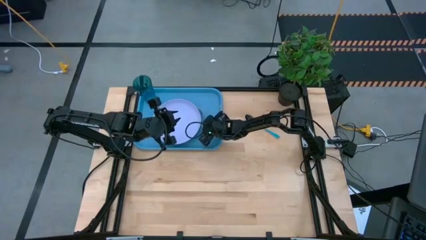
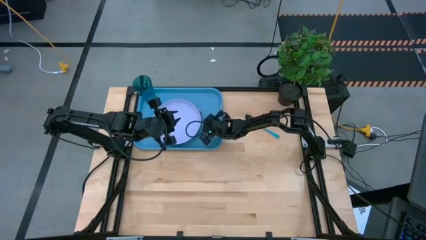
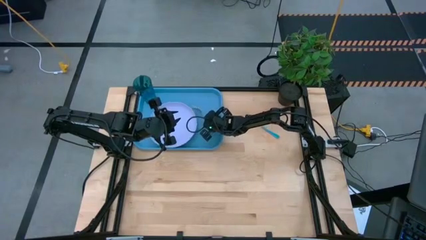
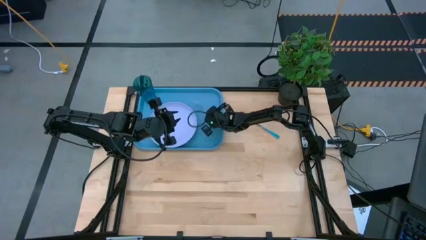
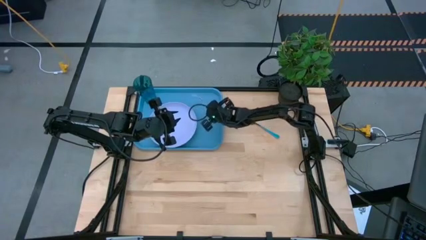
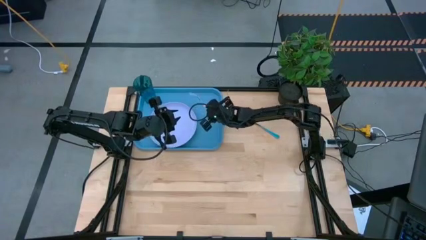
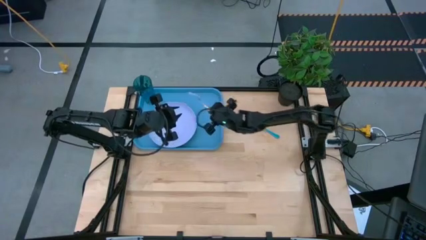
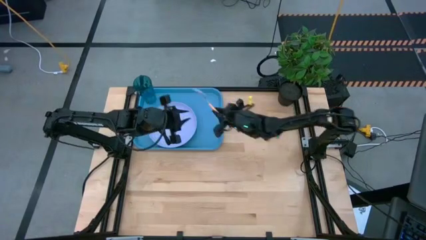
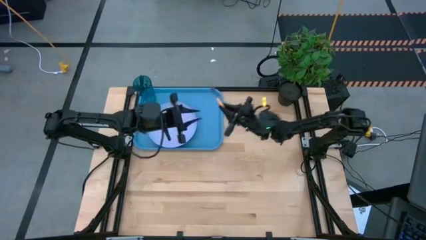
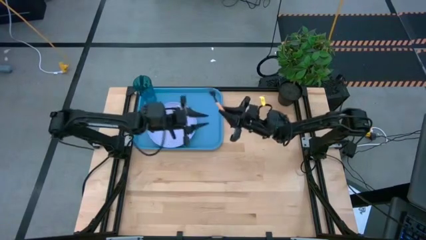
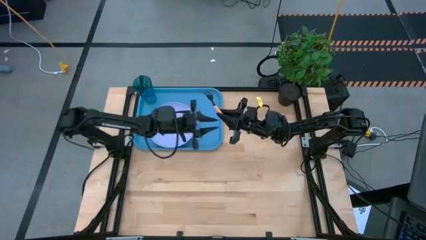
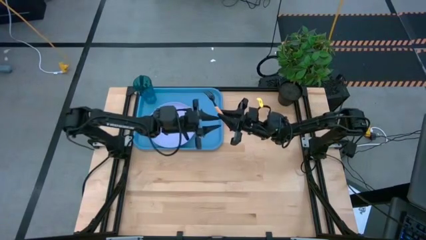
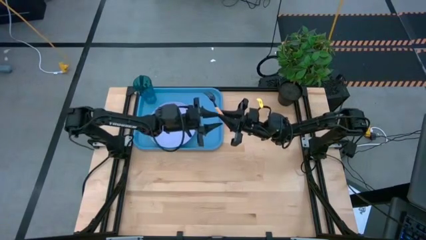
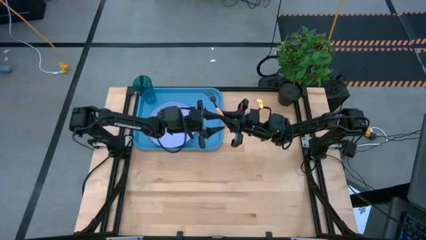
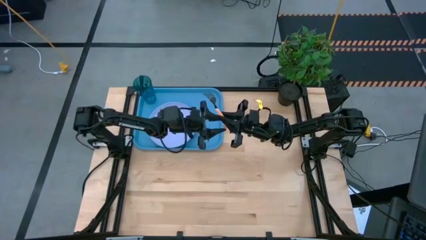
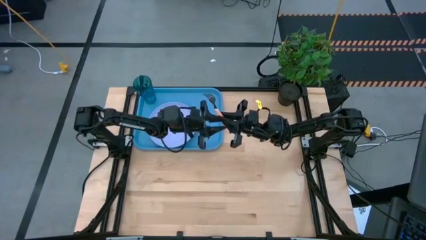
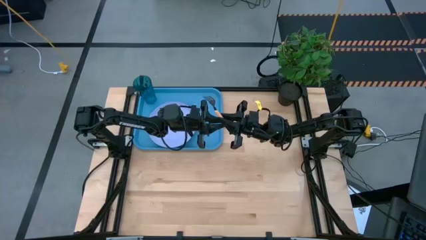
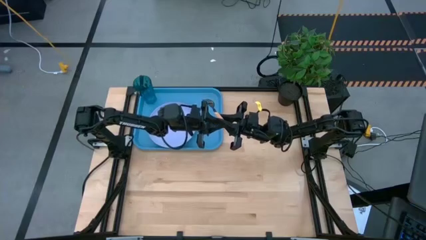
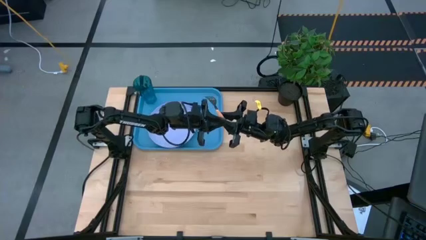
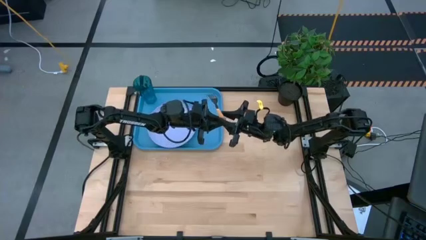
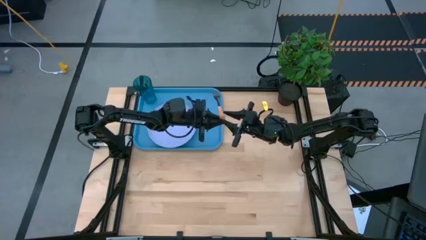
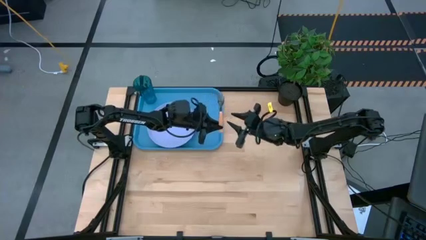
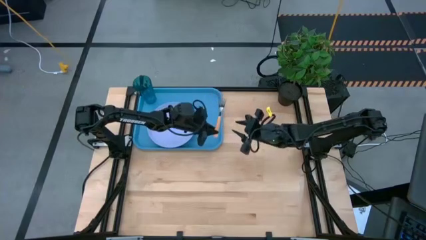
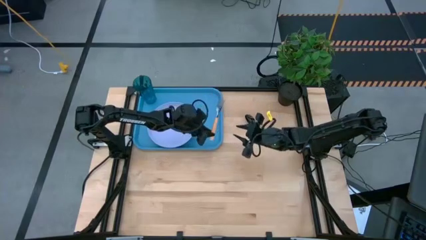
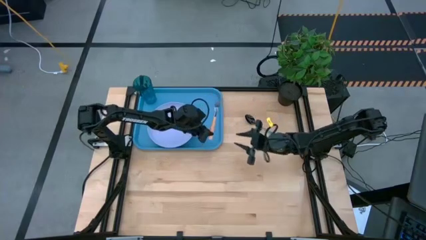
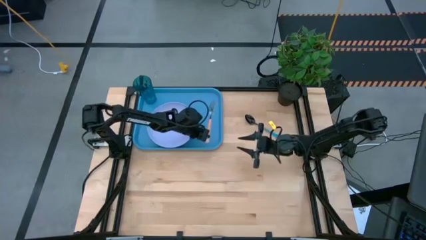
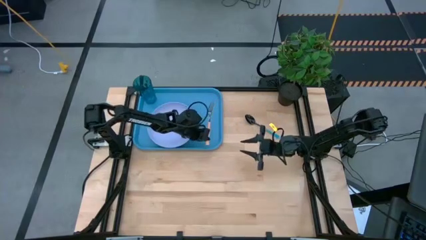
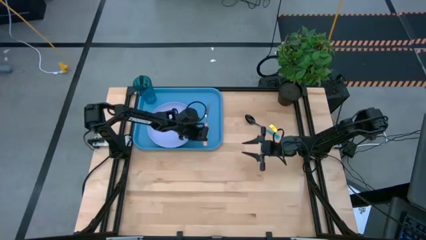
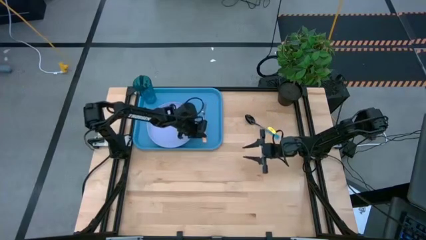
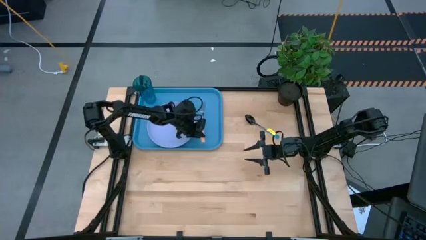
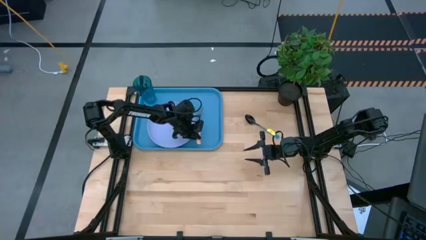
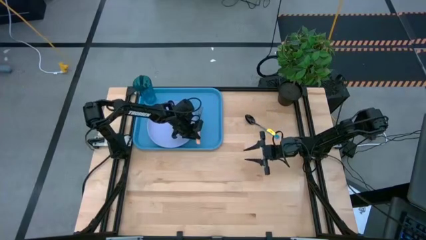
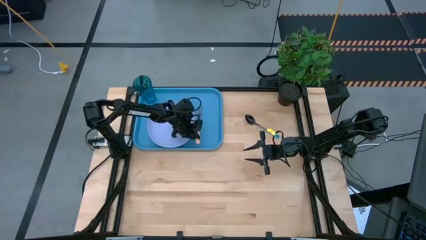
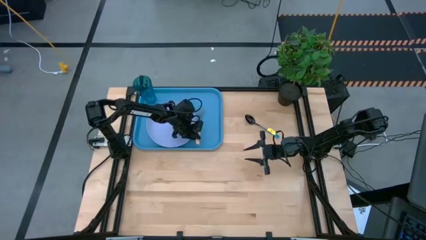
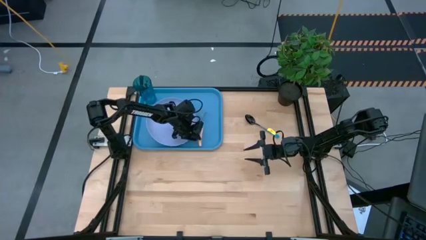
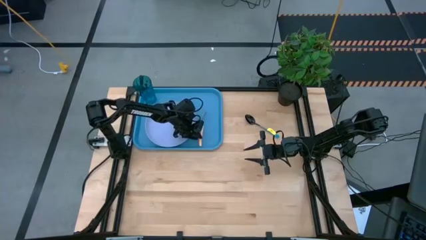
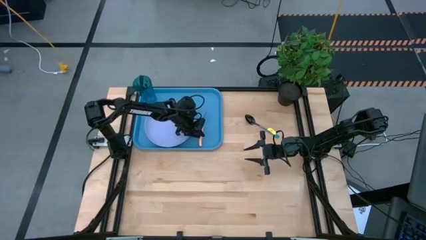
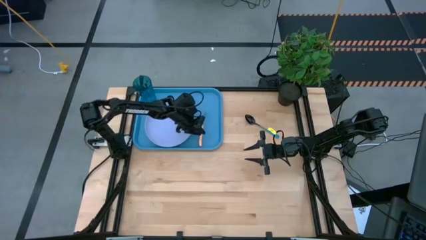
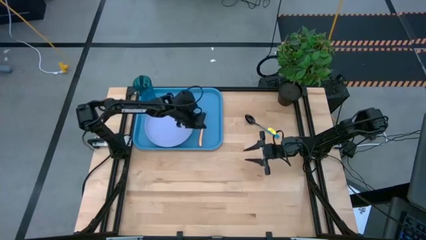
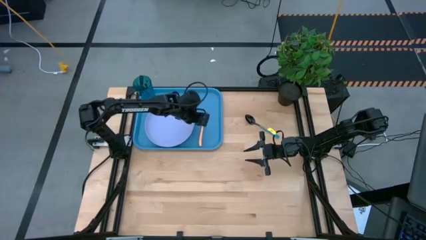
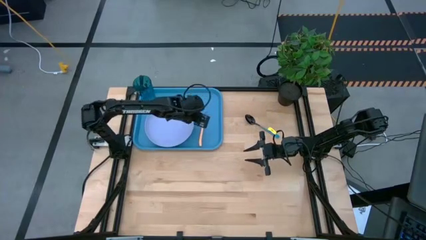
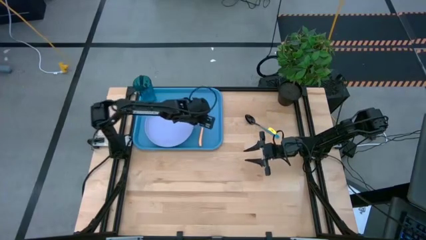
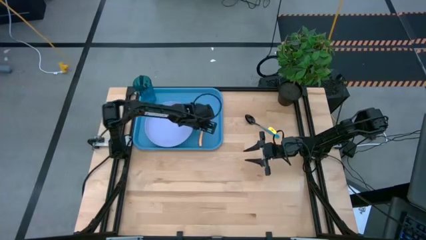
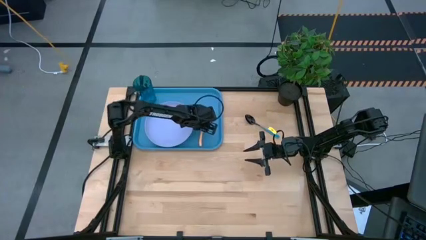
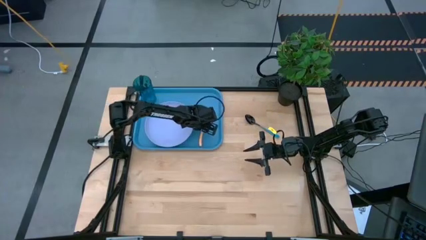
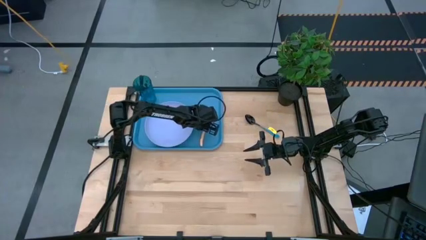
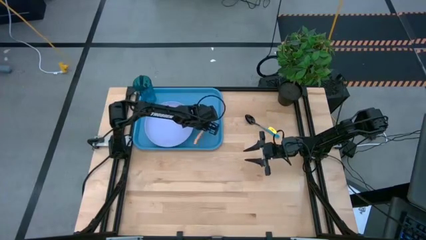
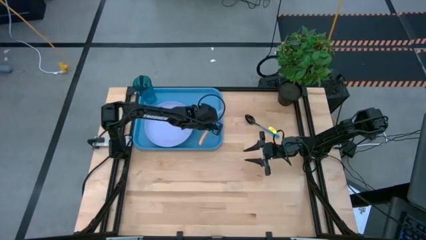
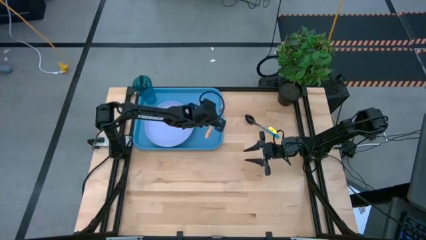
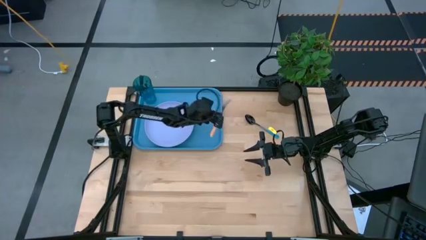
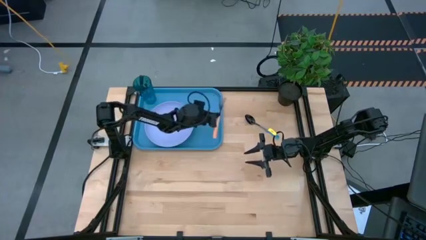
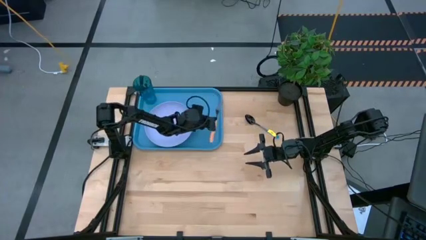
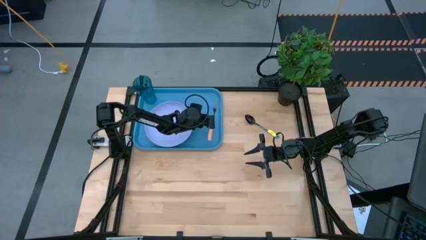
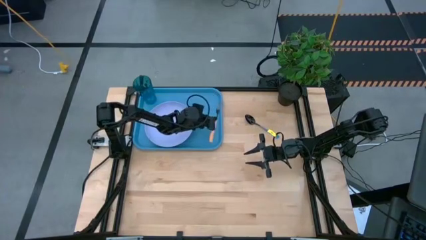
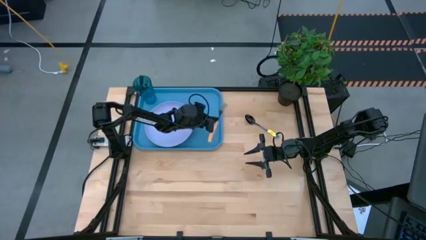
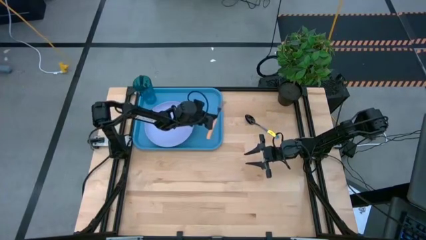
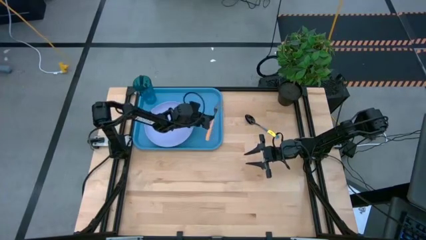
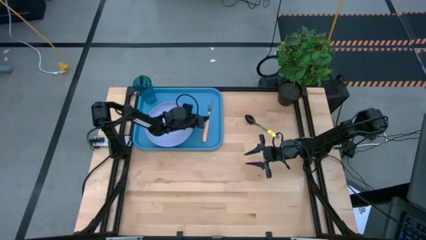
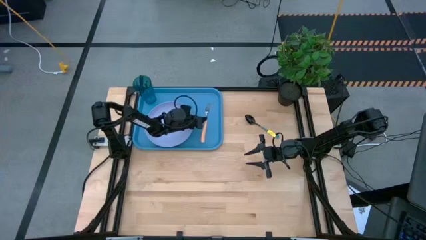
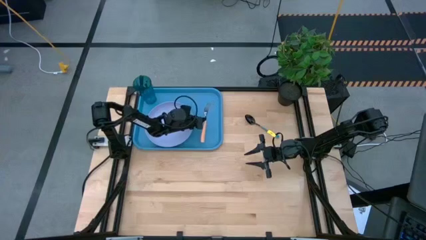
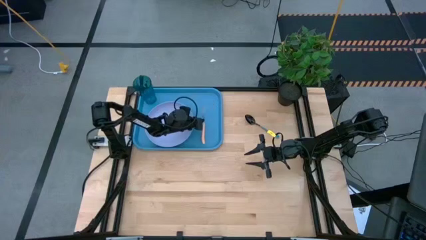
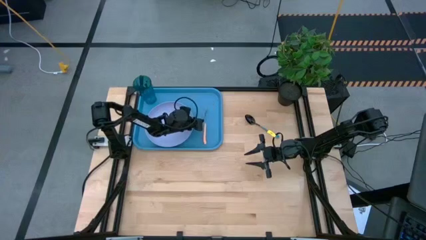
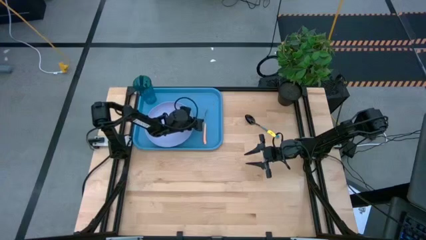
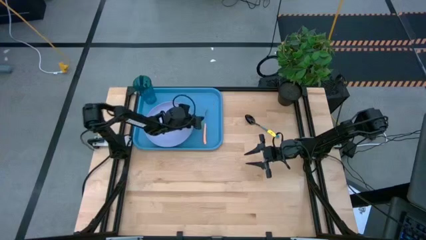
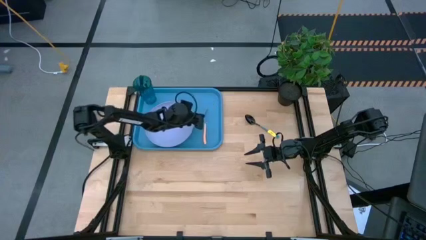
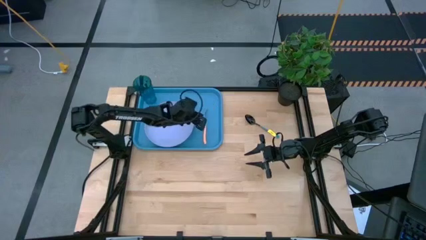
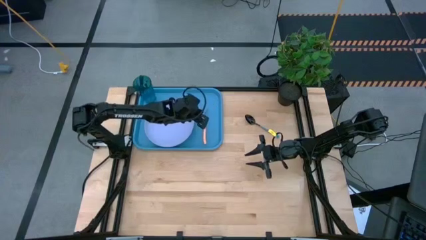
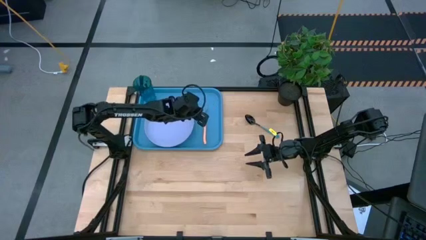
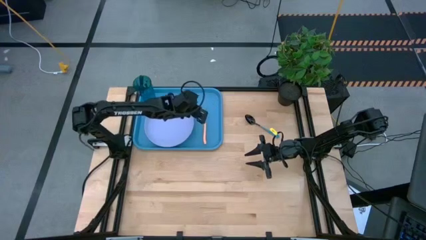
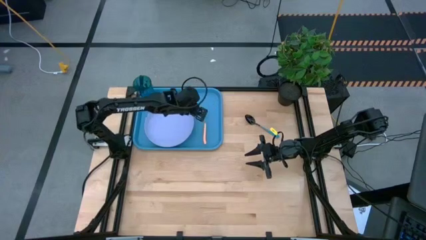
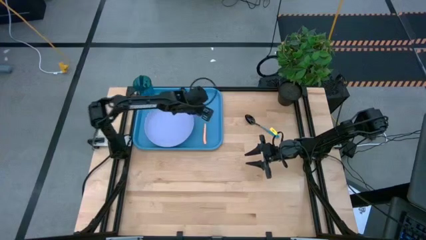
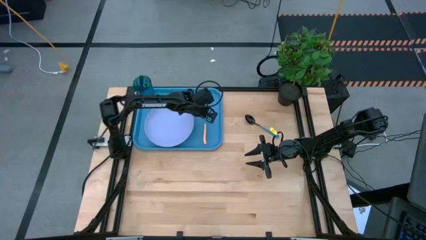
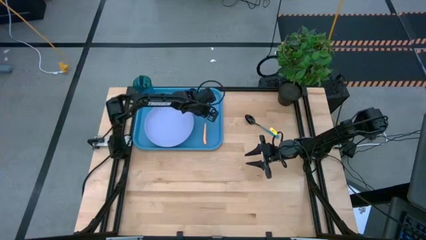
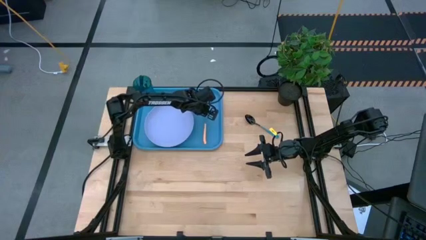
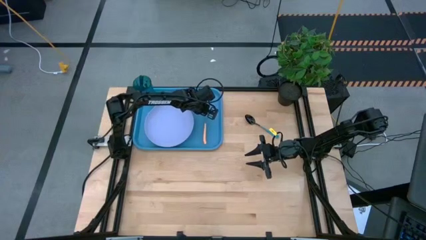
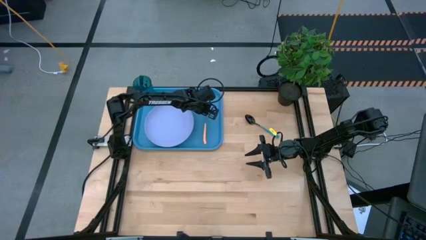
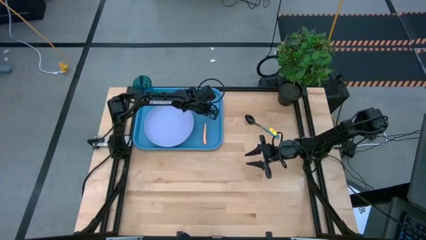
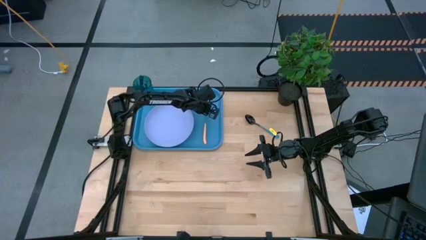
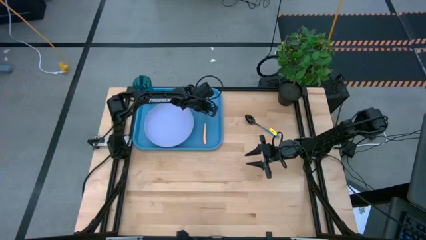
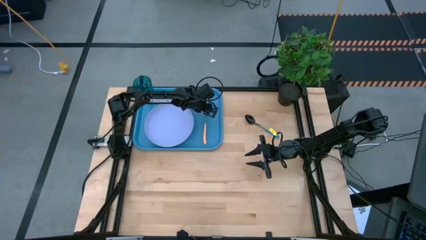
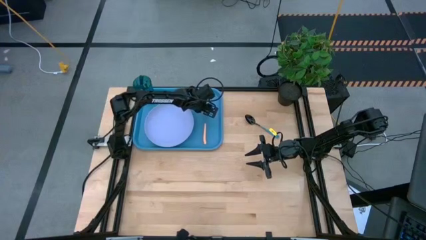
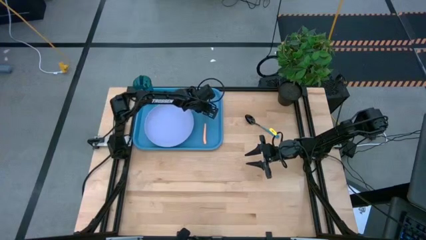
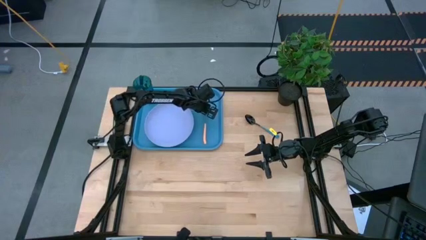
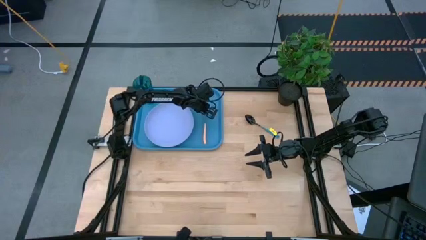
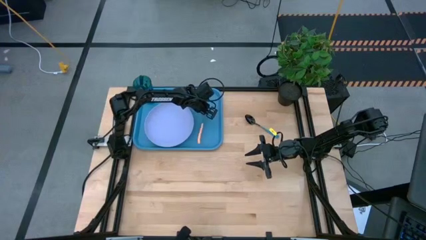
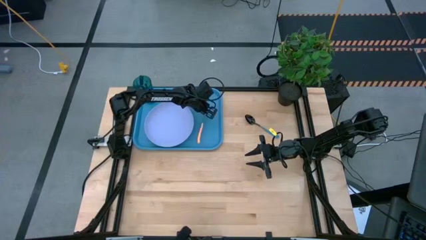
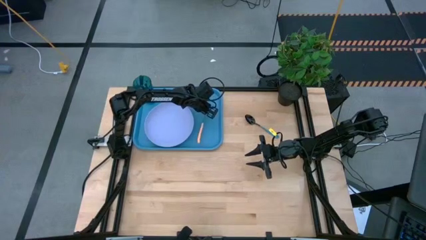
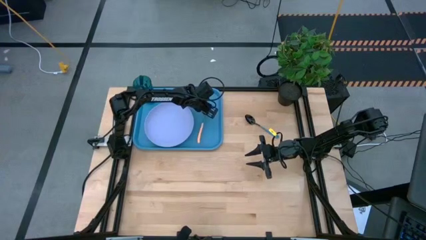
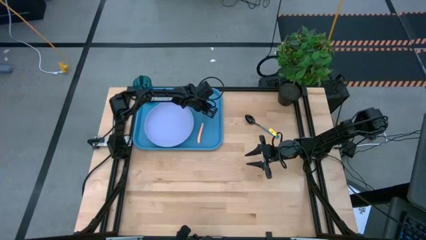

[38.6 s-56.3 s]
Task: Pick and place plate/cup/fork/spoon on tray
Put the orange fork on the blue tray to the right of the violet plate
